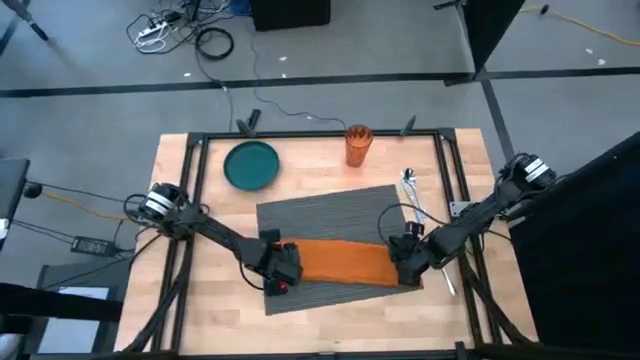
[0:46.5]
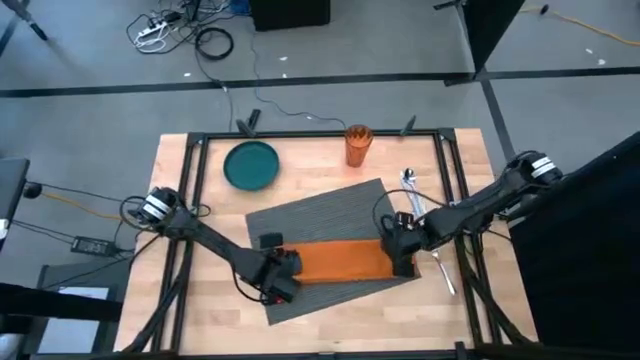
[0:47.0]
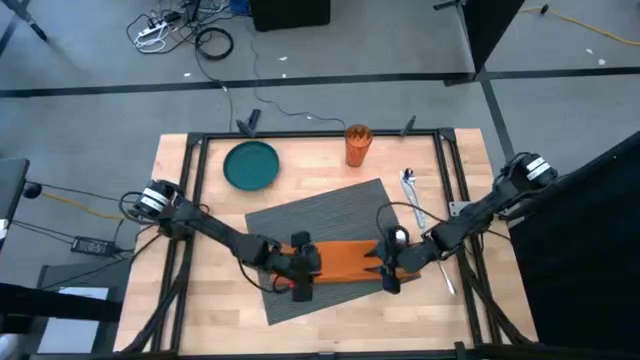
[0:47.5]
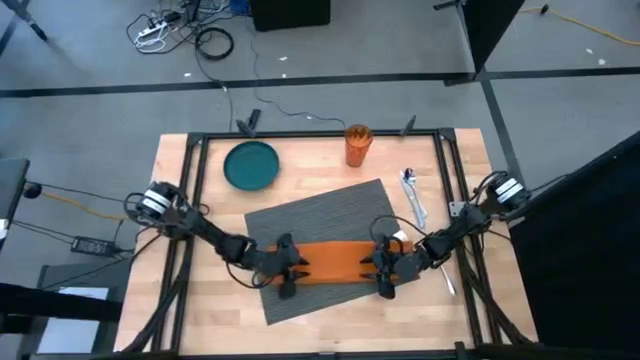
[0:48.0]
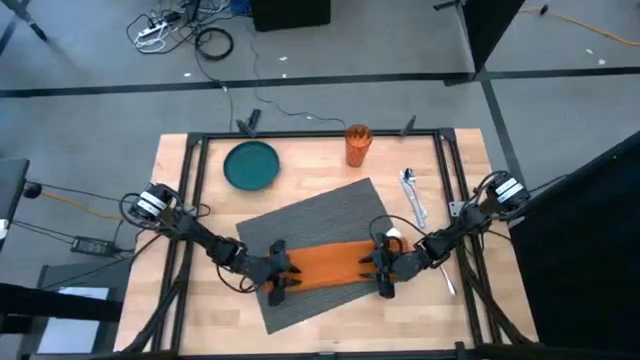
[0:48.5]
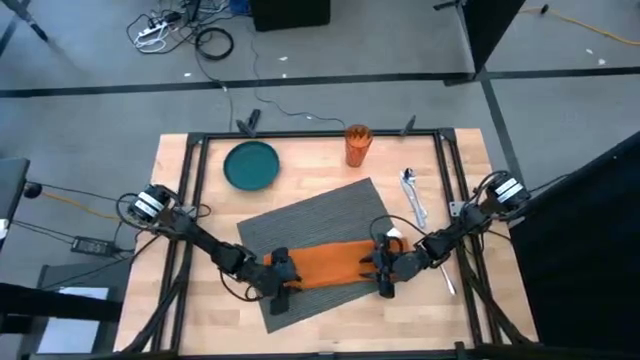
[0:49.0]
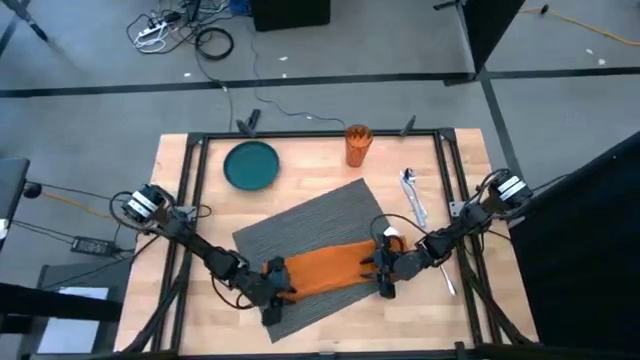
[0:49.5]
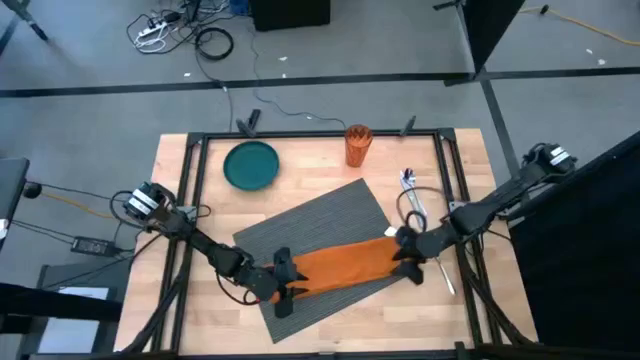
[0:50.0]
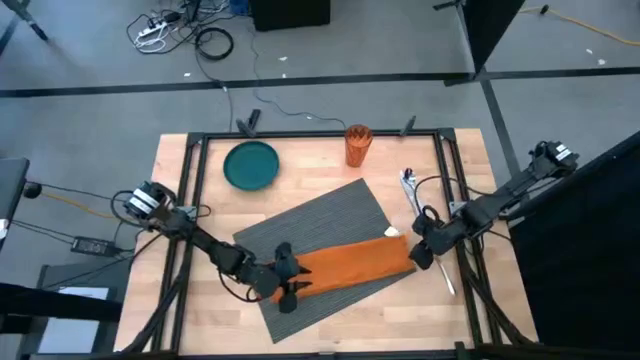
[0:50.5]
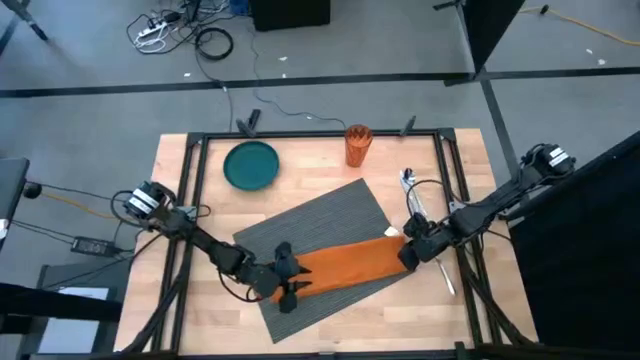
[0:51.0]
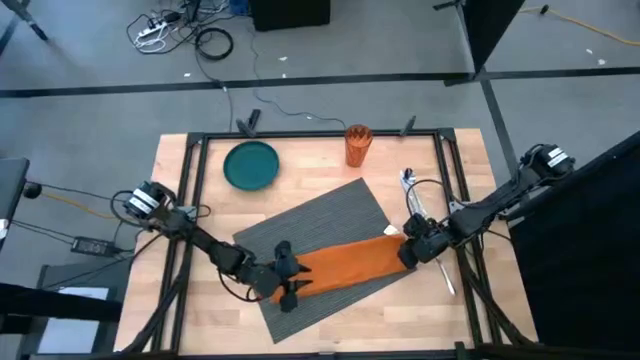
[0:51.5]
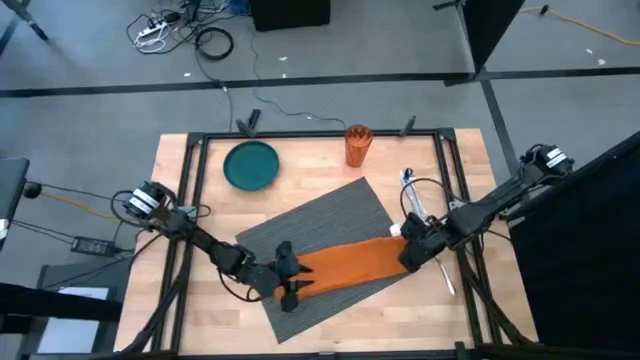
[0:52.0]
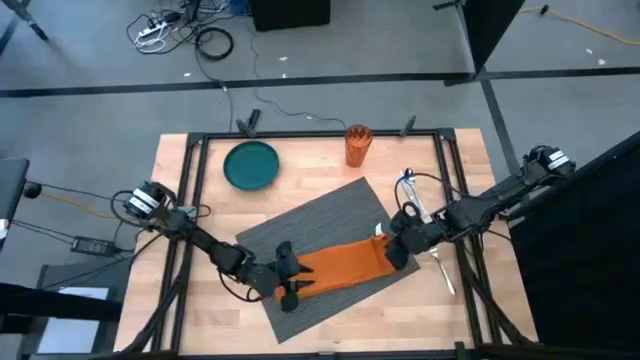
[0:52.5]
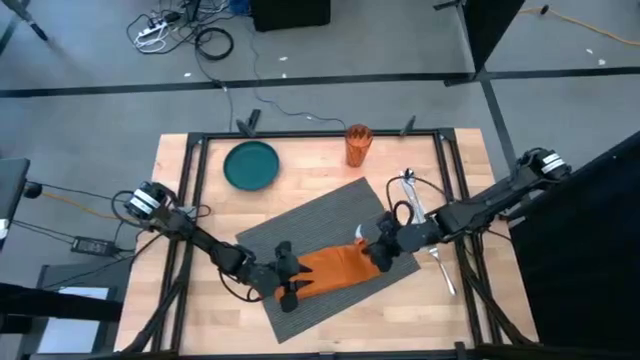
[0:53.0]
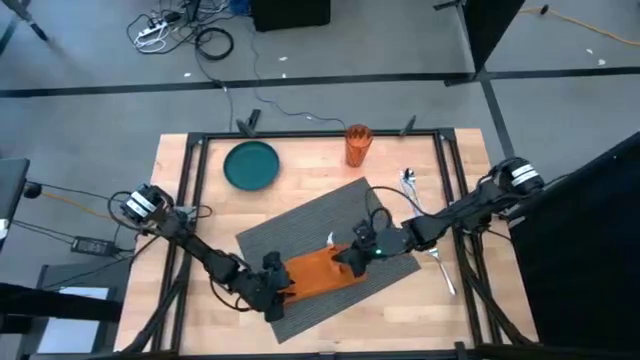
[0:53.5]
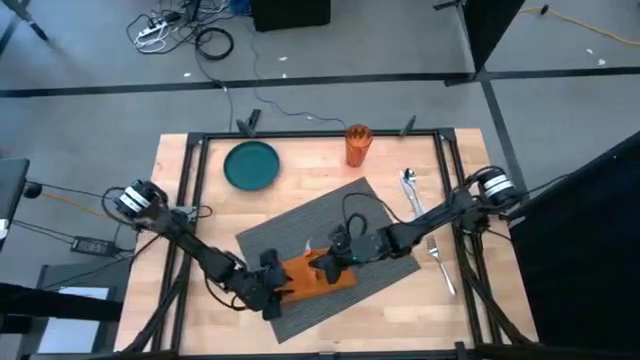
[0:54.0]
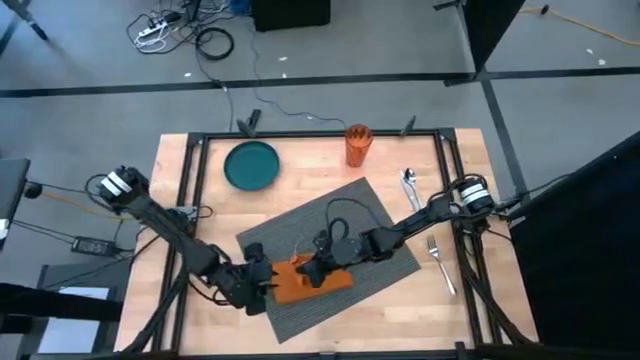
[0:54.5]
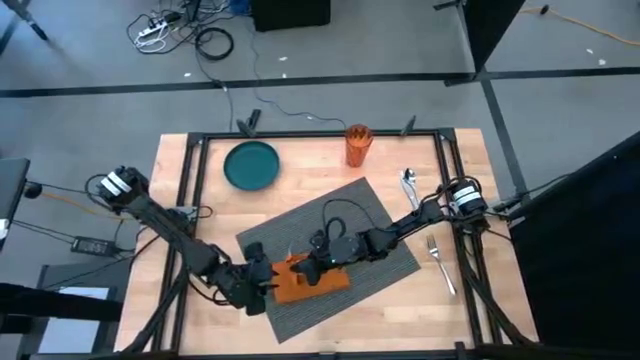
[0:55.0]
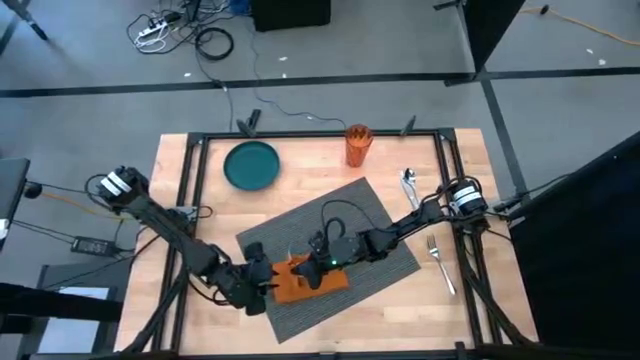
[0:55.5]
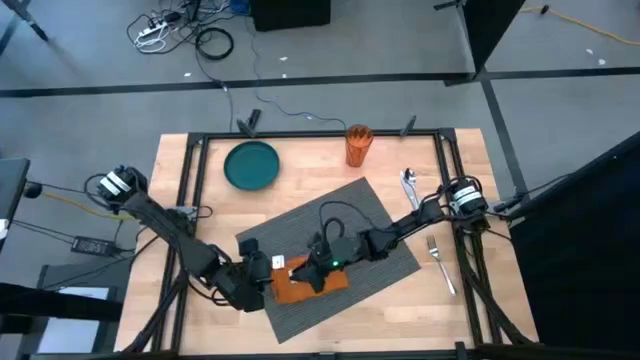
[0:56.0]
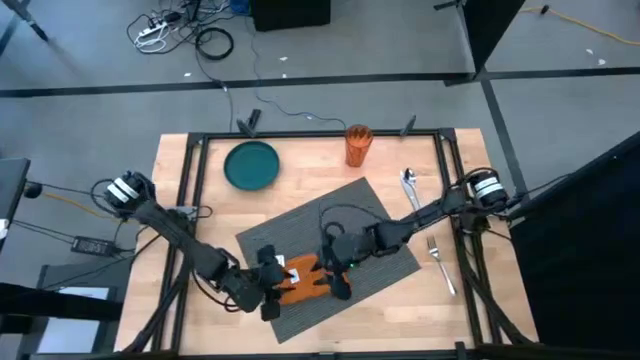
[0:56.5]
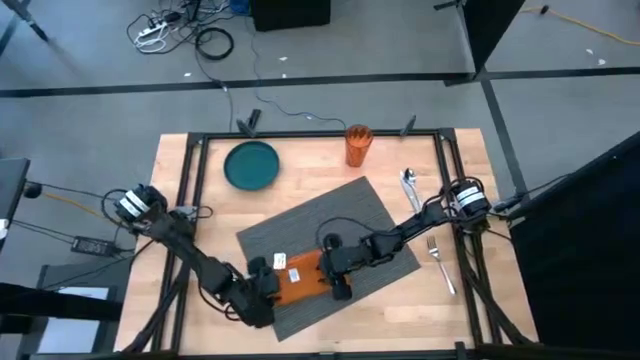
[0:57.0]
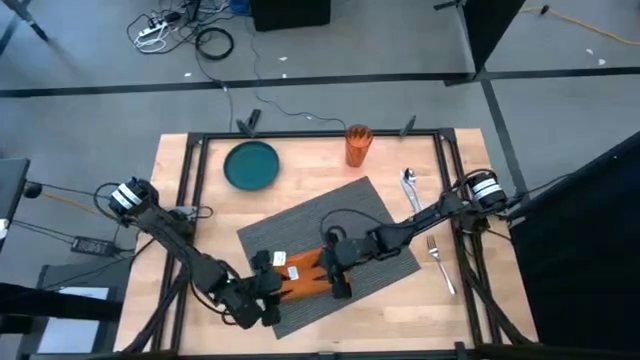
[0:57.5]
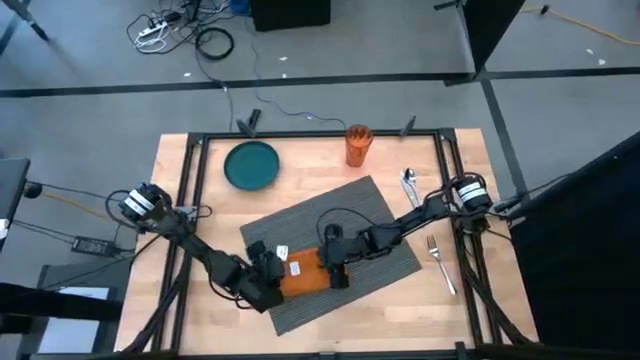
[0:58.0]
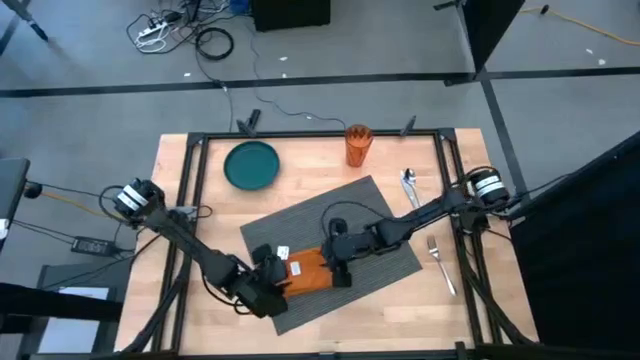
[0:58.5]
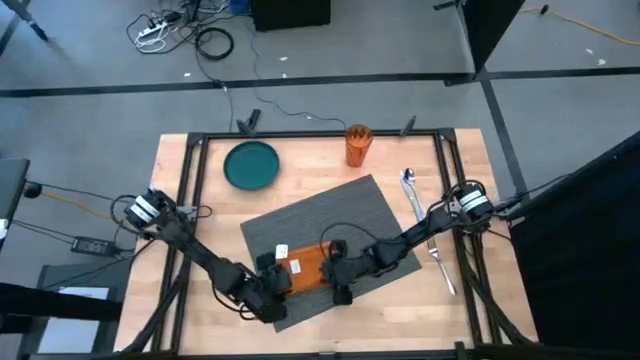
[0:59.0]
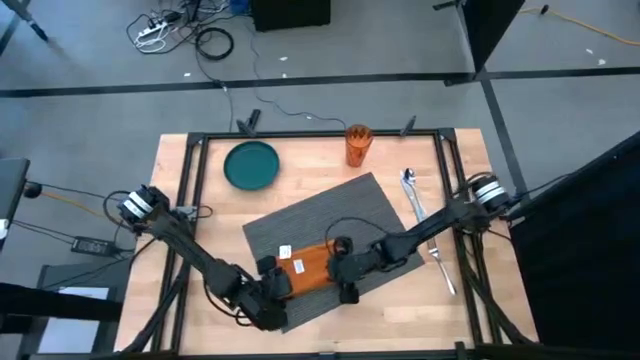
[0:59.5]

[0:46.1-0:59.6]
Task: Set table place
Fold the orange table napkin

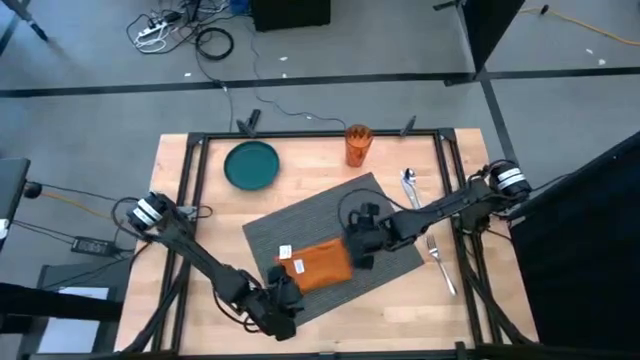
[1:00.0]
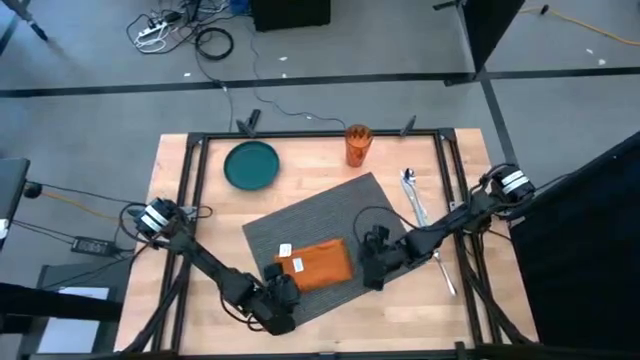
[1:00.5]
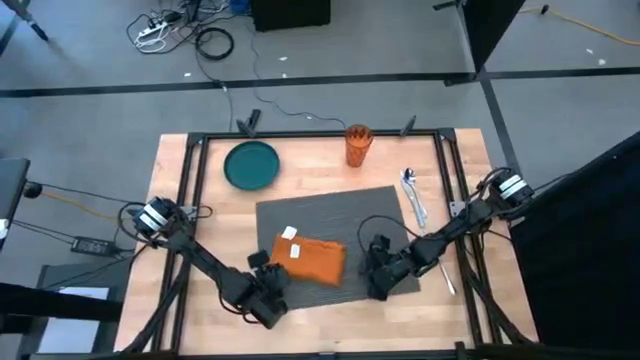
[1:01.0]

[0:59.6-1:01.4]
Adjust the black table placemat

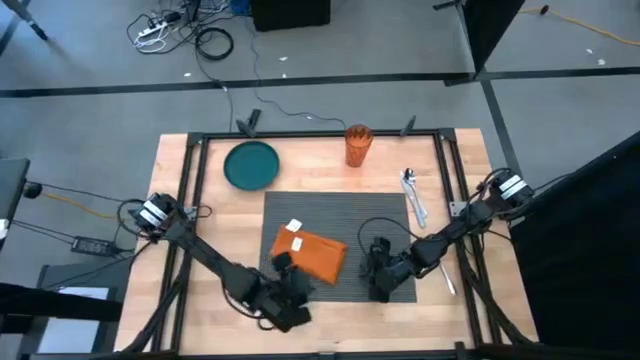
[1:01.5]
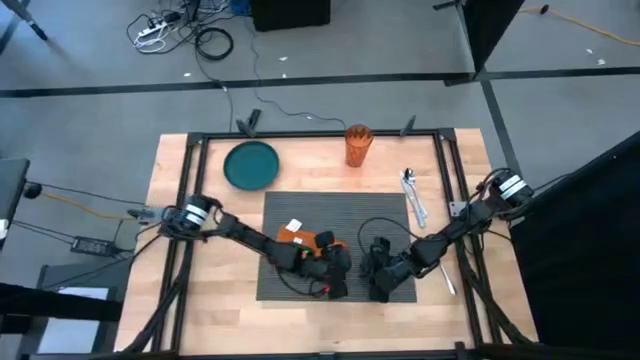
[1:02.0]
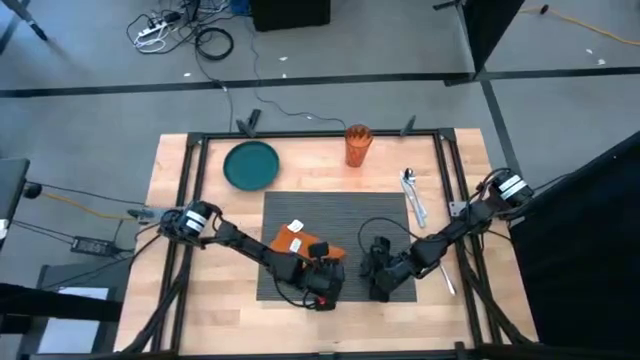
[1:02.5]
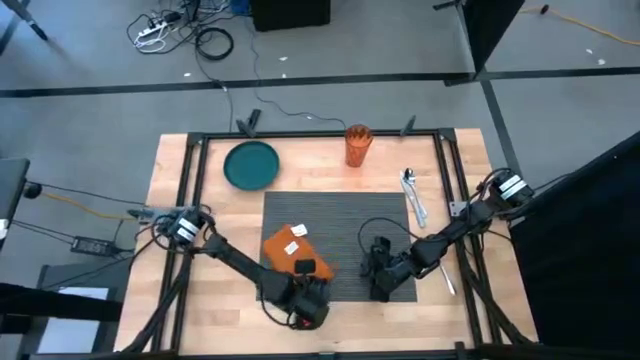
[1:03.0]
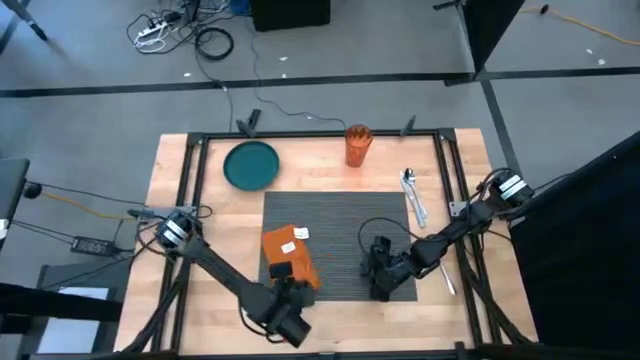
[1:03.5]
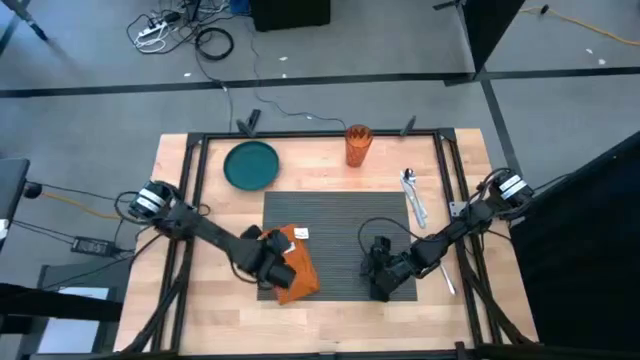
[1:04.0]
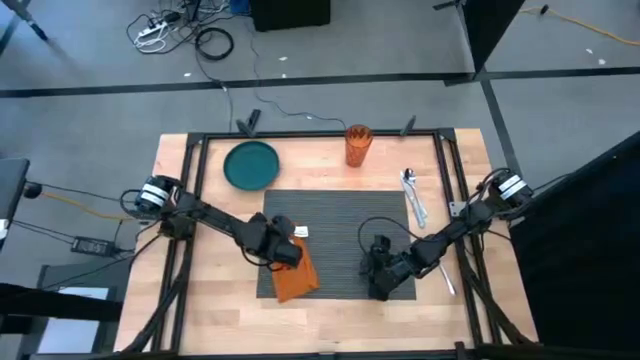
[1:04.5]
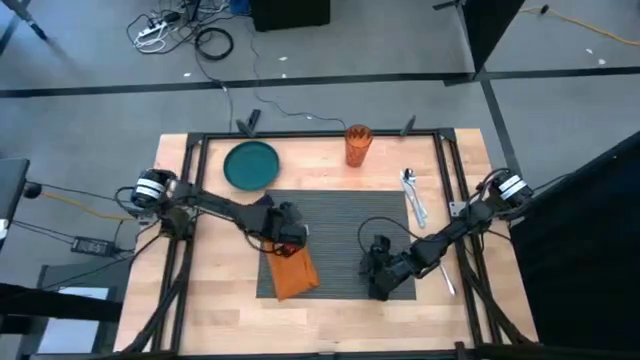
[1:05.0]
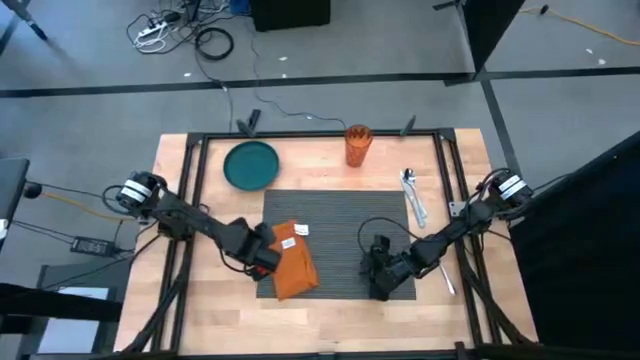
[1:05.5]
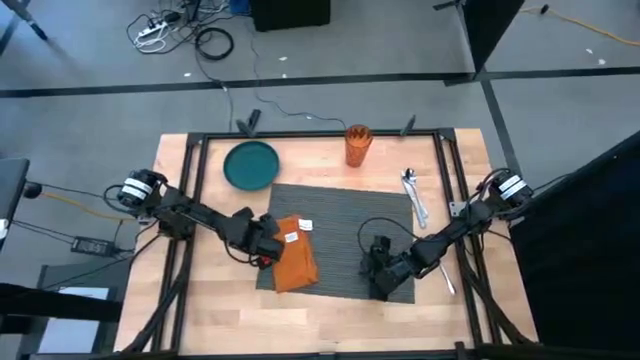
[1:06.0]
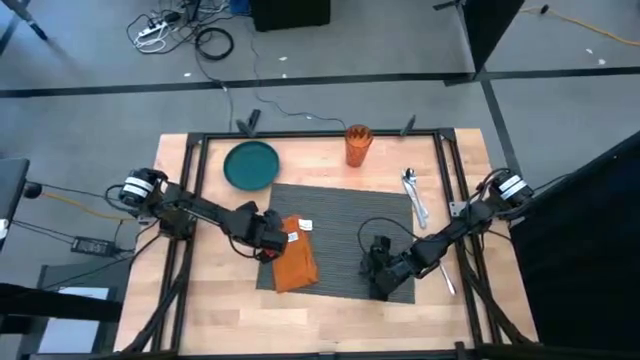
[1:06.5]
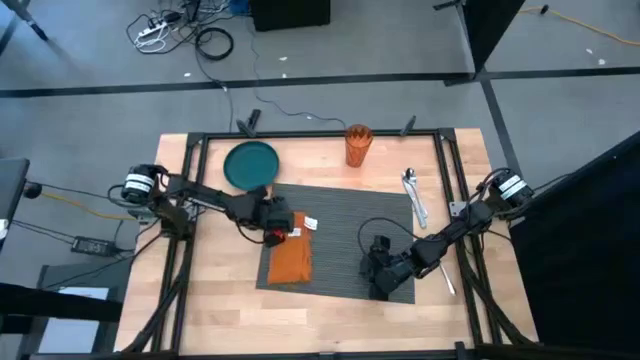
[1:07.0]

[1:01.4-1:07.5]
Adjust the orange table napkin on the left of the black table placemat

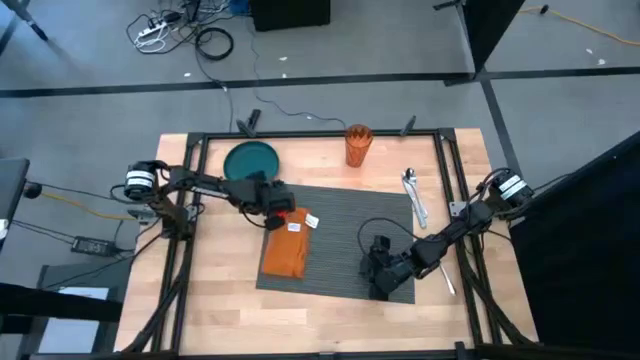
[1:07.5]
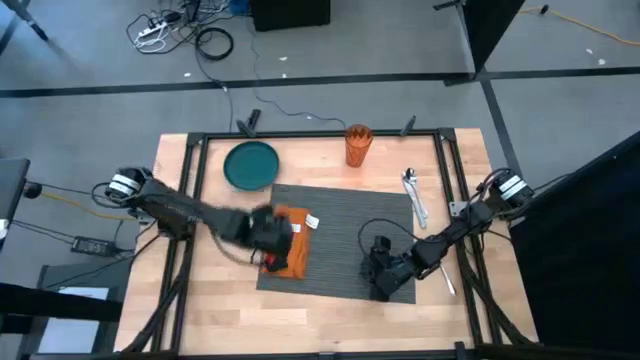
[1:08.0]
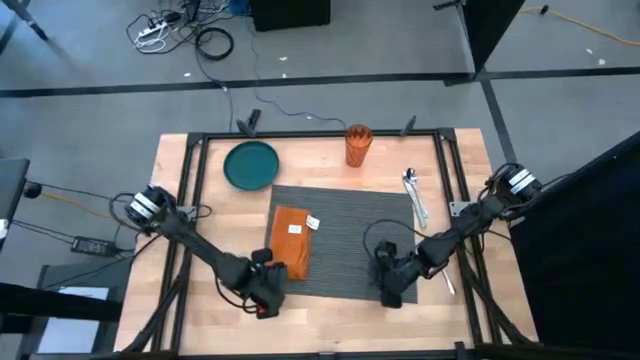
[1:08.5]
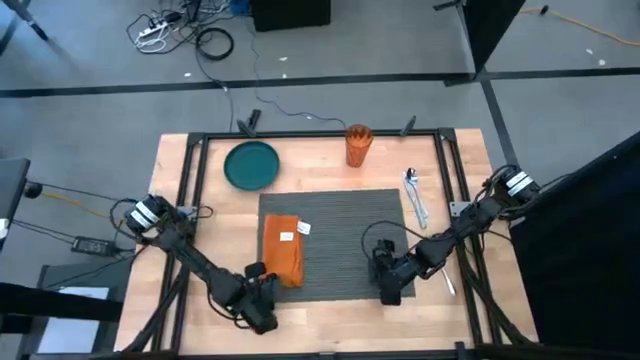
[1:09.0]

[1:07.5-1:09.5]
Adjust the black table placemat
